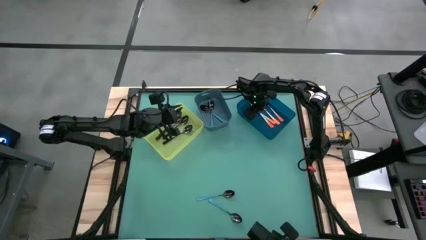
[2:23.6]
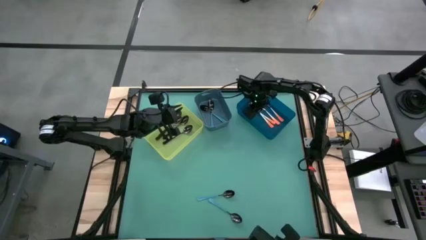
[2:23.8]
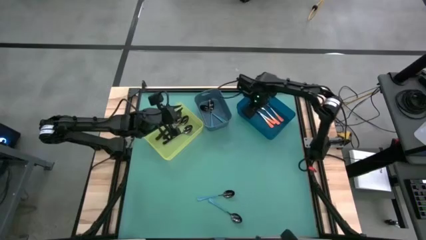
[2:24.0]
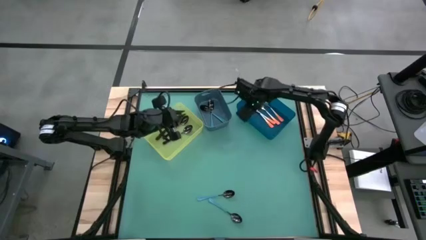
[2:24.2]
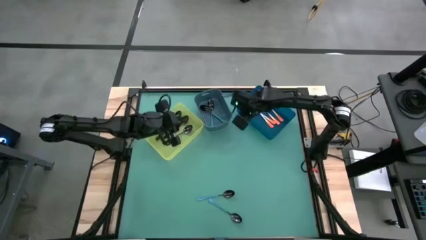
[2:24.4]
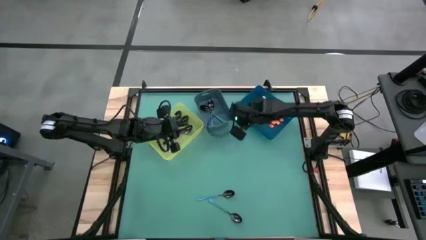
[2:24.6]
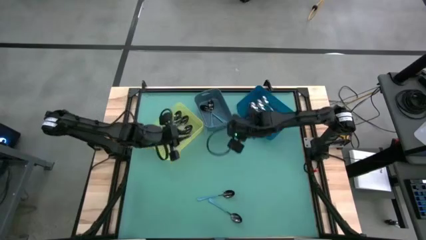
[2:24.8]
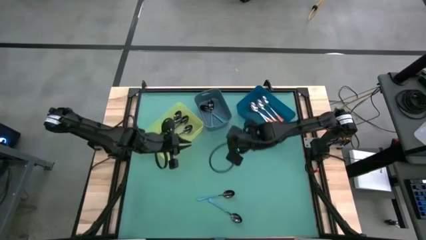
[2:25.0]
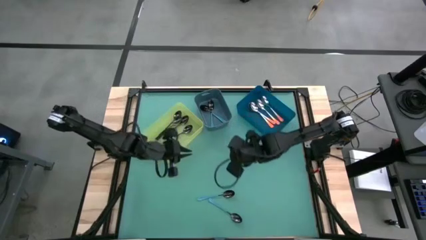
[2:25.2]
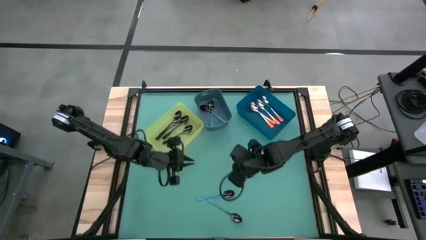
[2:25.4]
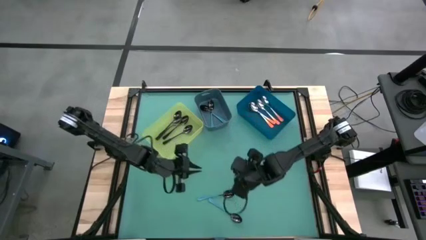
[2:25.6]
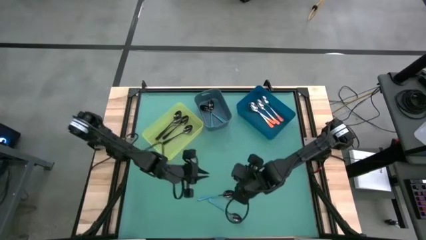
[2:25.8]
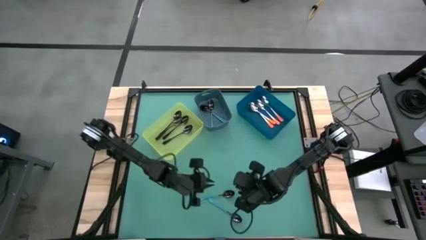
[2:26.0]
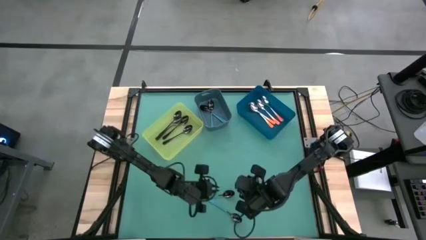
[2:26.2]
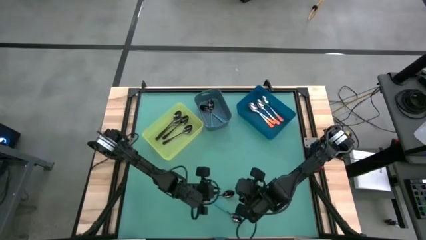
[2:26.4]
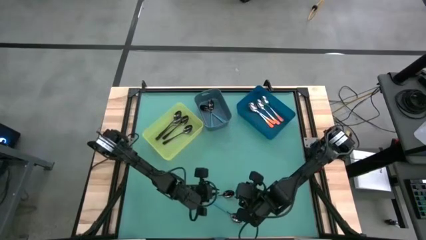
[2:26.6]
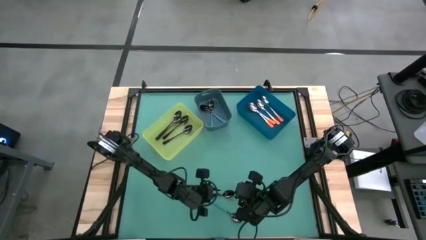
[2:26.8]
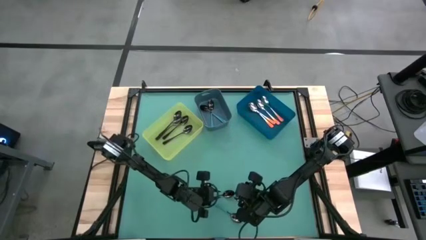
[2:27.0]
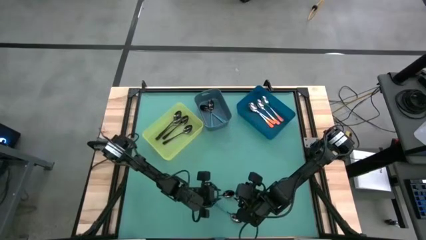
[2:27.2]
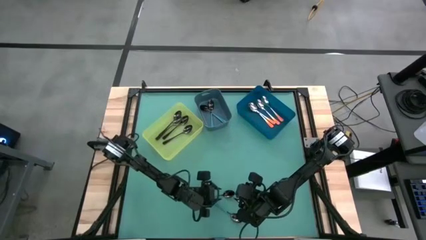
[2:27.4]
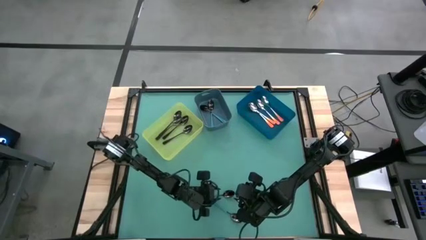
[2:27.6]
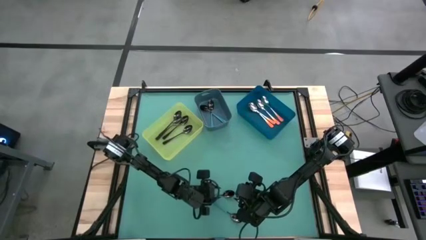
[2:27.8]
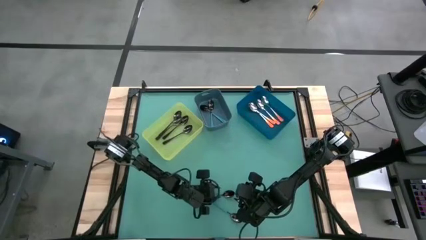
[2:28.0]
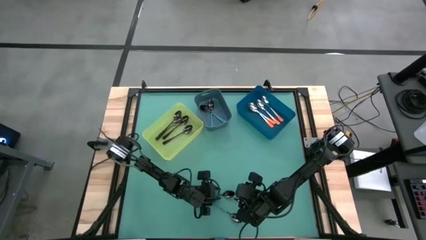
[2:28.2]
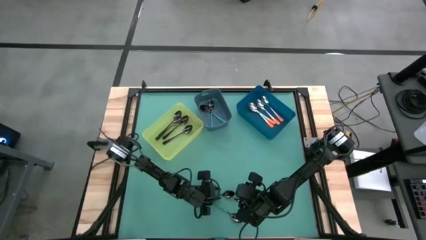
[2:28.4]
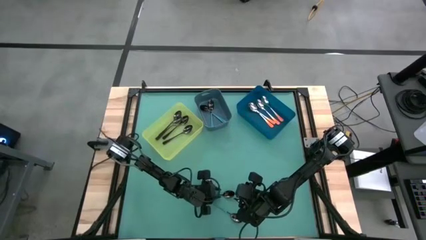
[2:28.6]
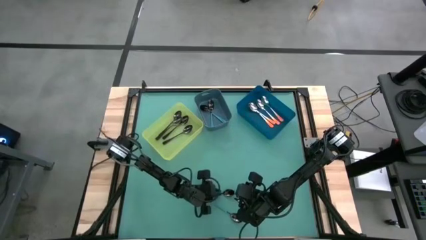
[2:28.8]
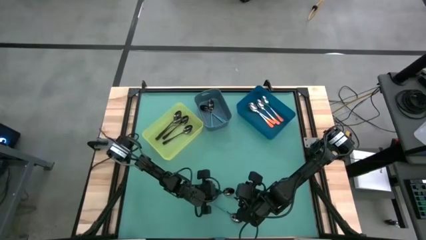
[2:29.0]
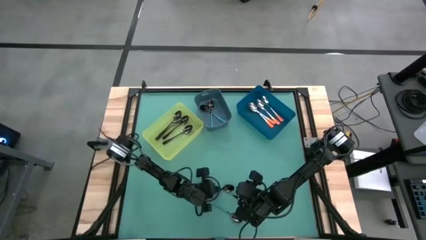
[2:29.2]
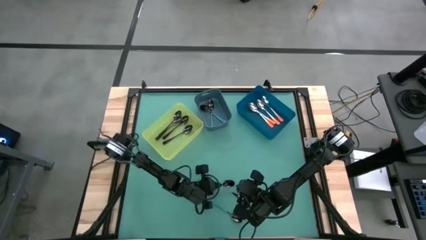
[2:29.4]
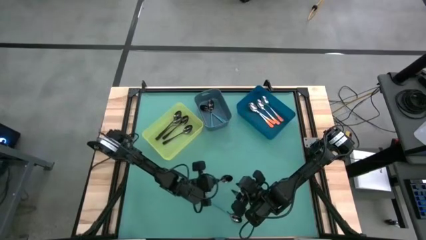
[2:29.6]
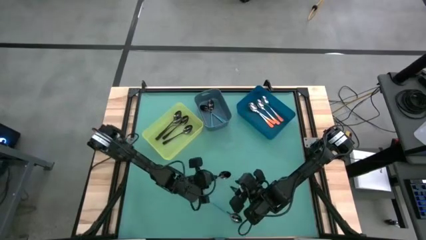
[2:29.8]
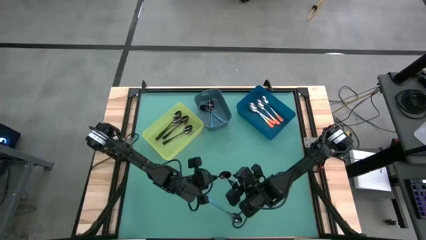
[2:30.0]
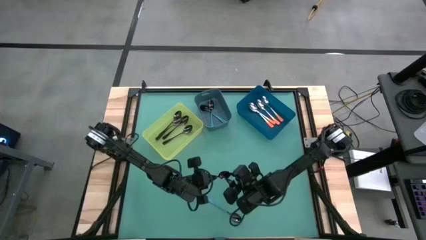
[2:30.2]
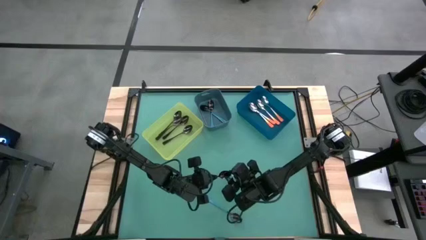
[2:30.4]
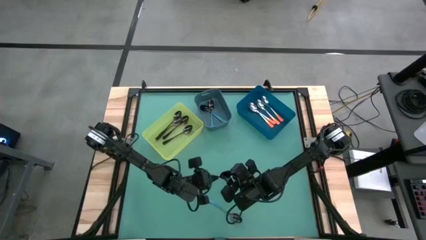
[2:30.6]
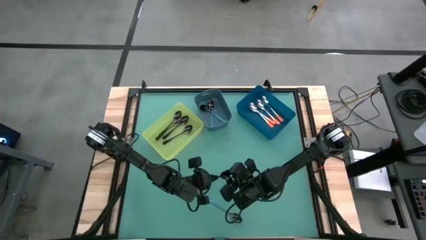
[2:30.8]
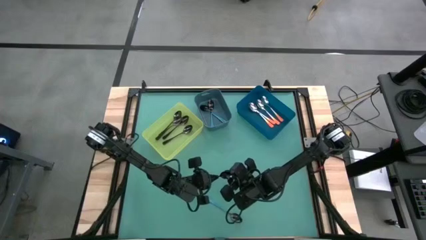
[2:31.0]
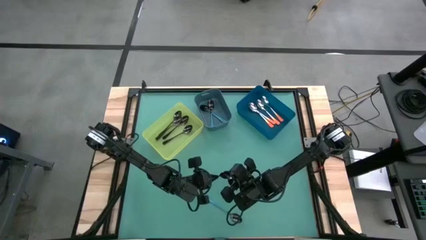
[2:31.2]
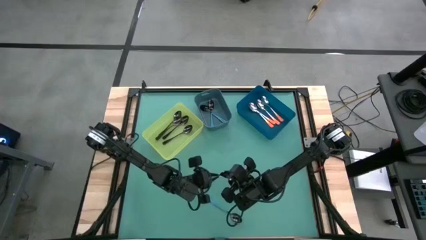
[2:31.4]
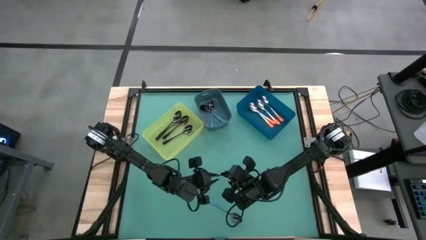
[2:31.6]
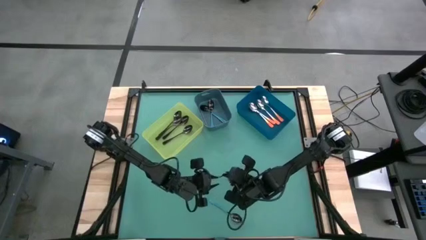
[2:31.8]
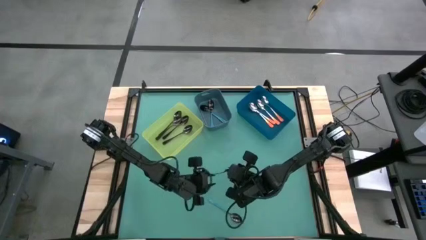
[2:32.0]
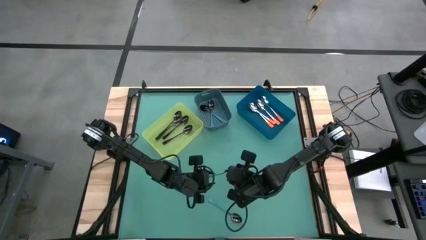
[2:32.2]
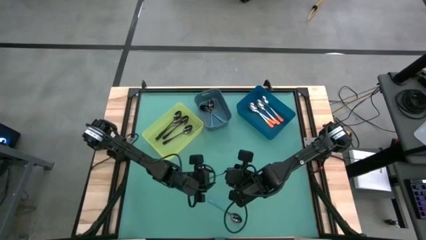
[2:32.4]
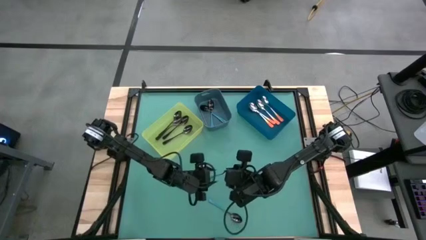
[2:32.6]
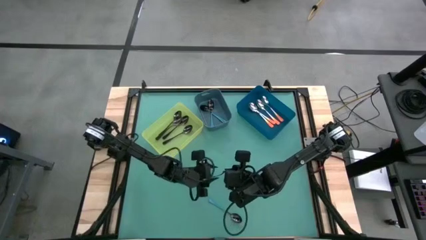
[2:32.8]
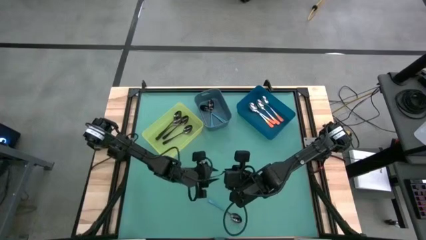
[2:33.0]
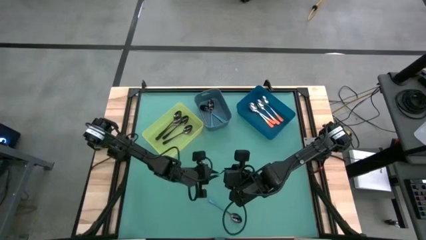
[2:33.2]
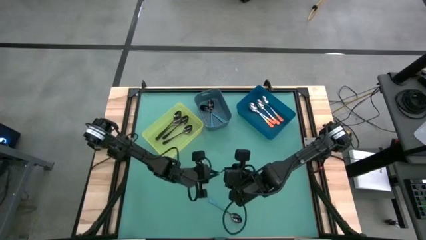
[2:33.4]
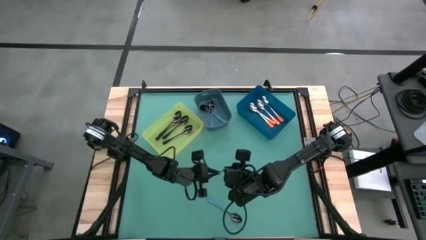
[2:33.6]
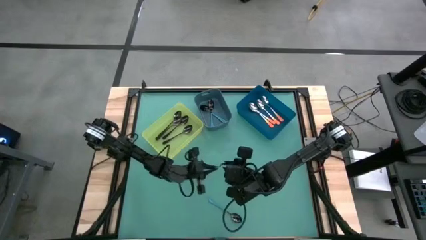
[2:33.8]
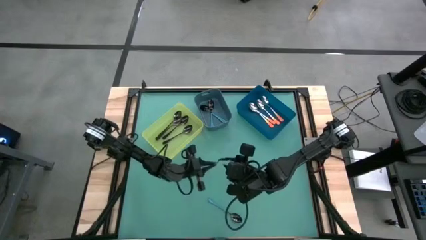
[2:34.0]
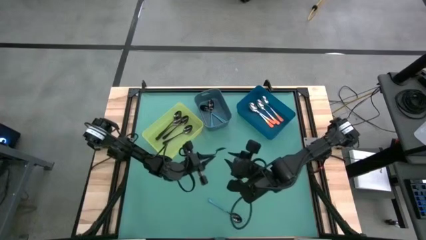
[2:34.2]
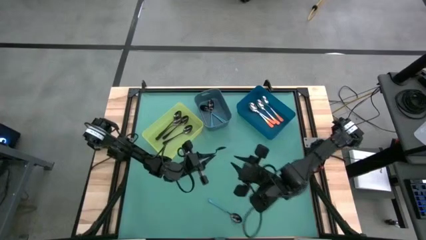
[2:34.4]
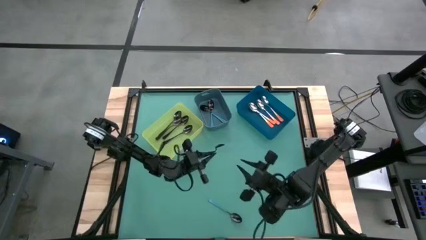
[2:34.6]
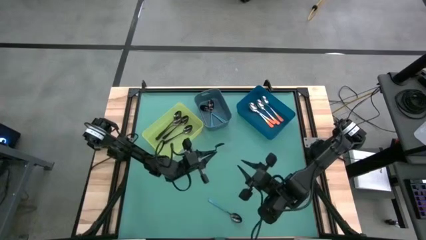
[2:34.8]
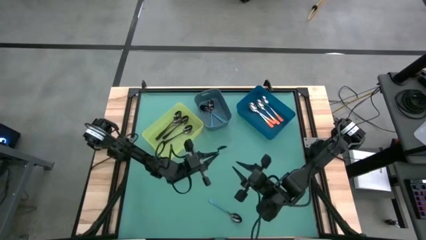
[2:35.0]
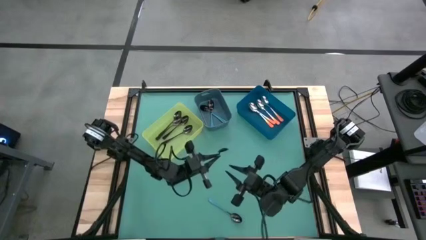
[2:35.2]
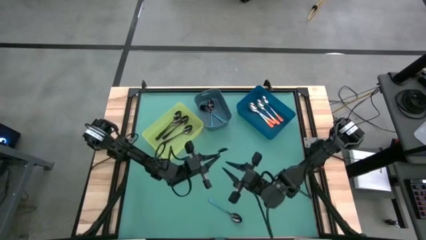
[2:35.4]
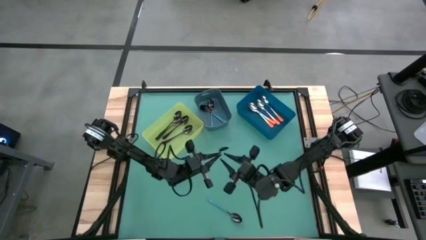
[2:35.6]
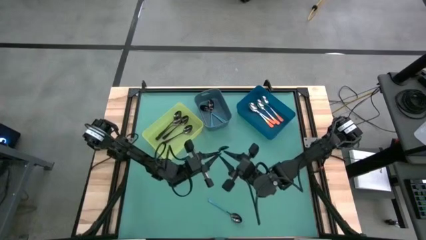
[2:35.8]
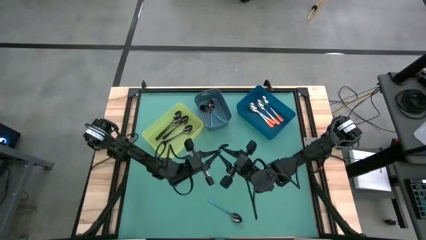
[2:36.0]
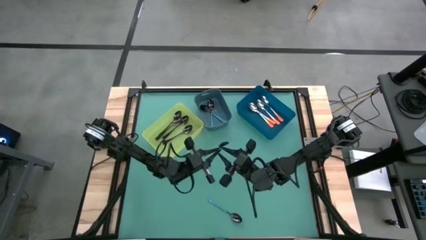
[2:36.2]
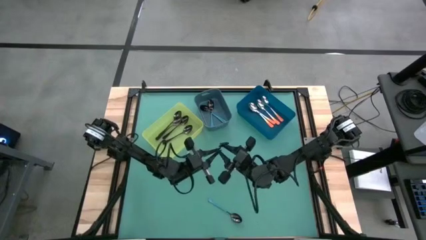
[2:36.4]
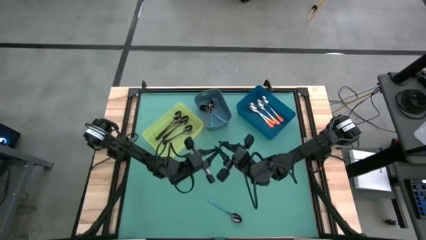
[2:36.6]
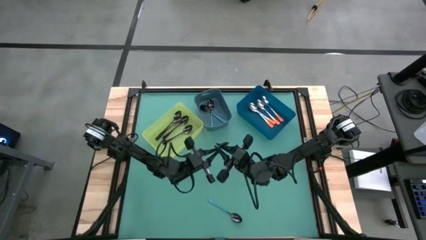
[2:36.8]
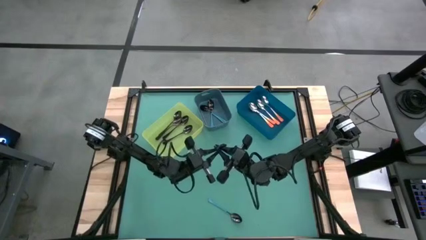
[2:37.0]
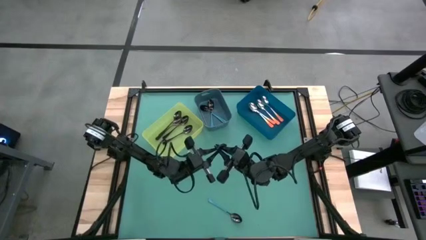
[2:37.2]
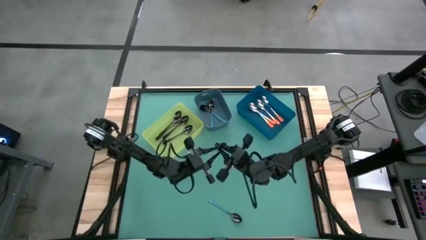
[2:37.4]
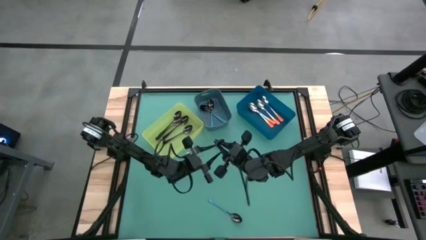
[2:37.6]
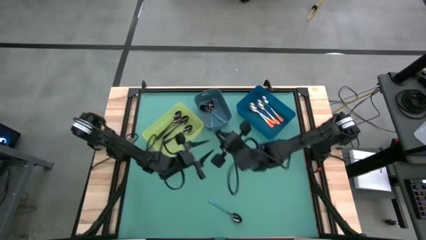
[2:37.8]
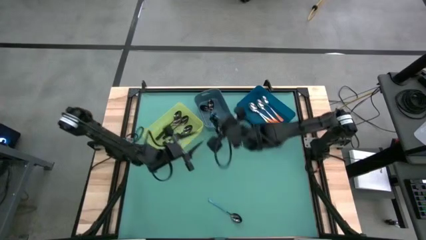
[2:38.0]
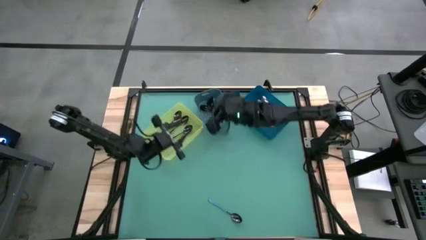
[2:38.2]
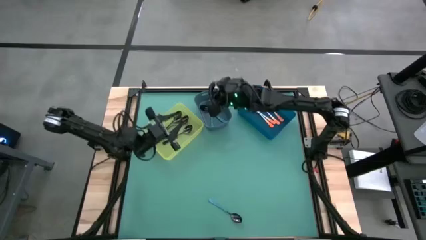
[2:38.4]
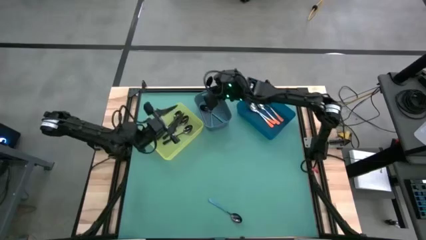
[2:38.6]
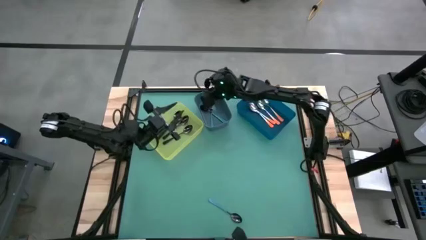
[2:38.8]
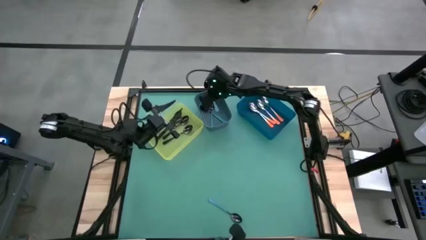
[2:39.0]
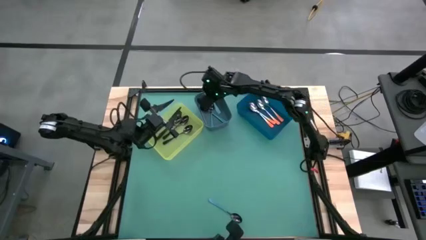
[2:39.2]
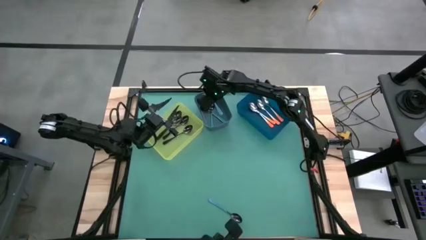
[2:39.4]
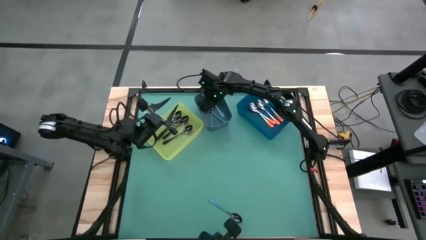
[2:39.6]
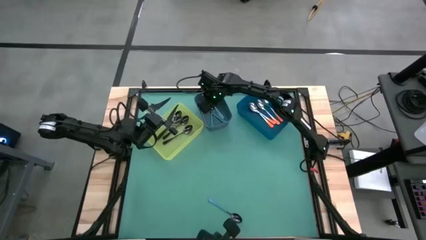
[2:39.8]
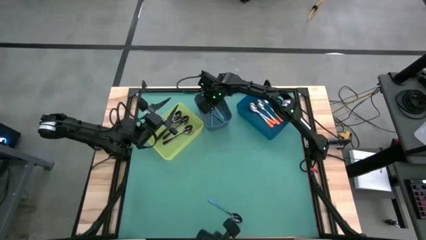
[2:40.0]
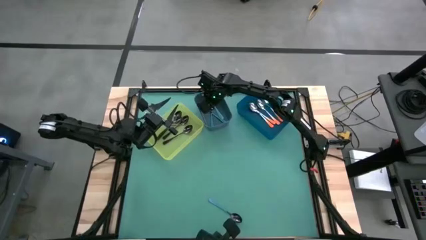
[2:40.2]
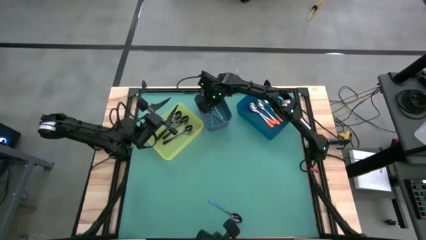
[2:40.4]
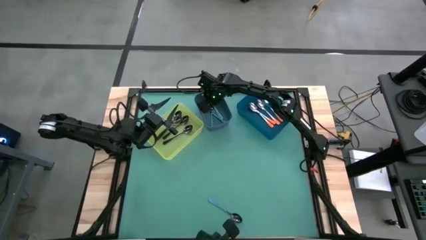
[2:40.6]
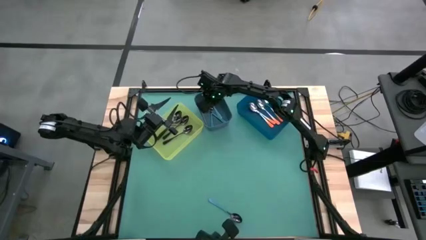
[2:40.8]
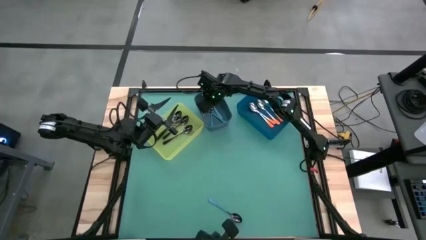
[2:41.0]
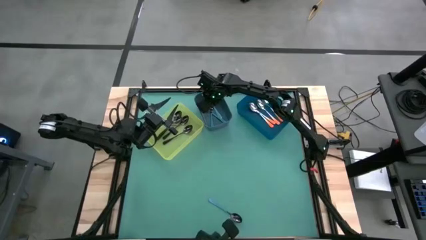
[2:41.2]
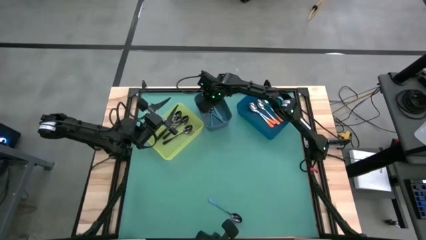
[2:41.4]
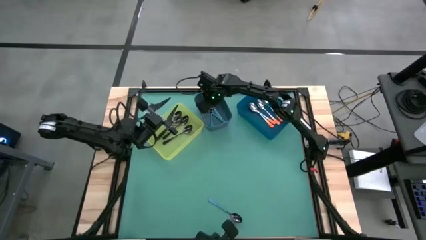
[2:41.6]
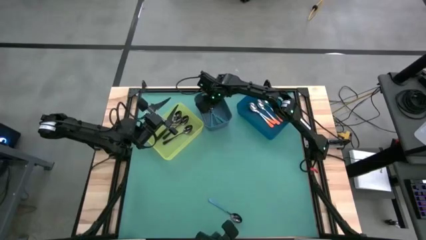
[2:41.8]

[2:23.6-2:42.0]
Task: Sort silverware by color (type)
Put the blue spoon into the dark blue bin
